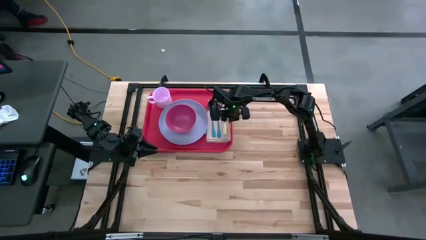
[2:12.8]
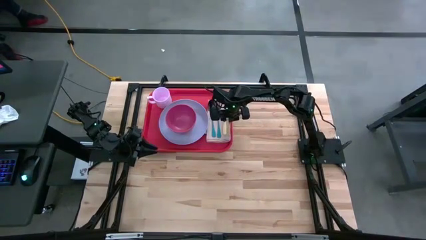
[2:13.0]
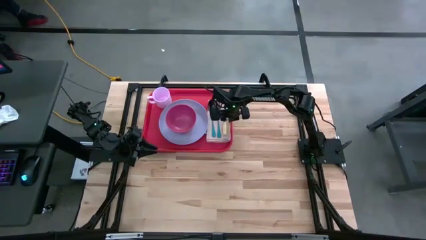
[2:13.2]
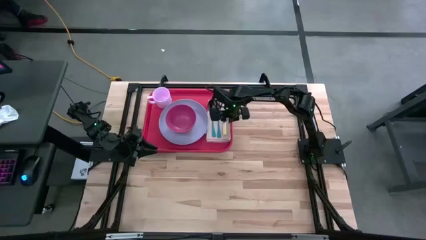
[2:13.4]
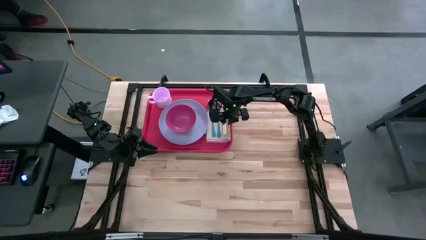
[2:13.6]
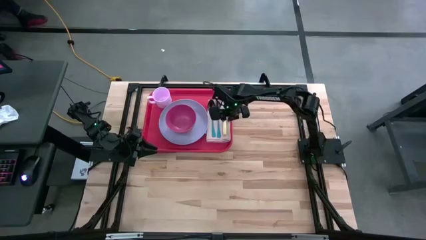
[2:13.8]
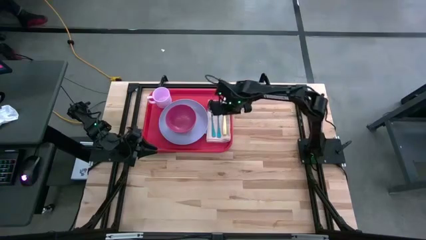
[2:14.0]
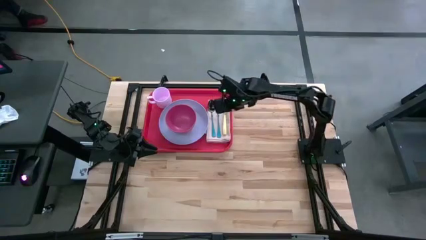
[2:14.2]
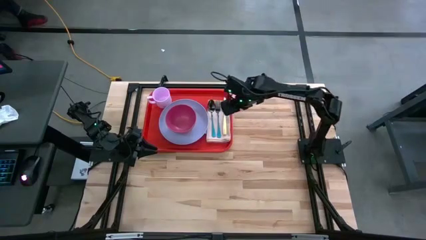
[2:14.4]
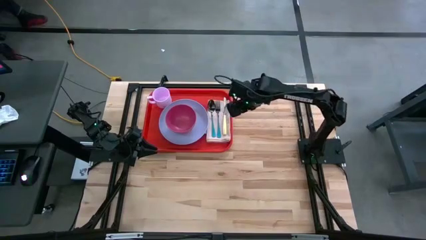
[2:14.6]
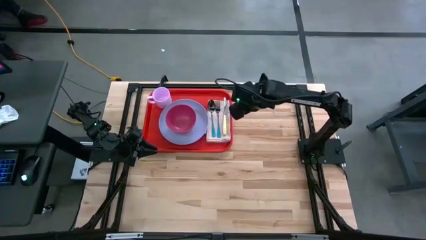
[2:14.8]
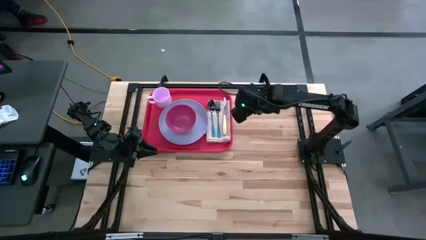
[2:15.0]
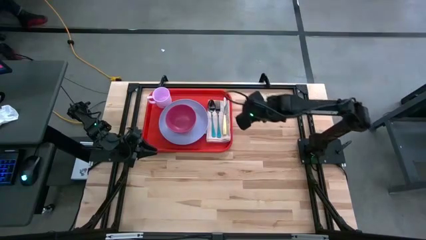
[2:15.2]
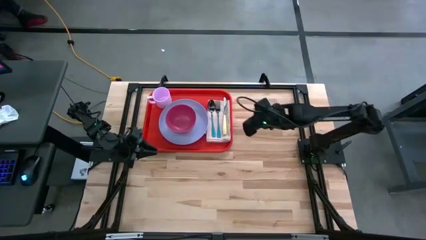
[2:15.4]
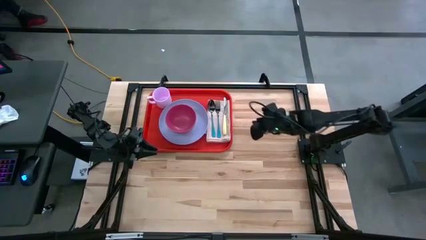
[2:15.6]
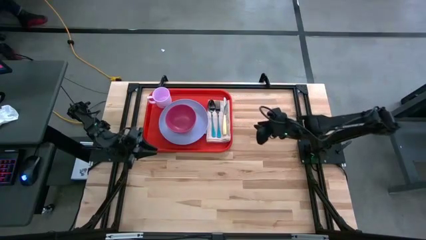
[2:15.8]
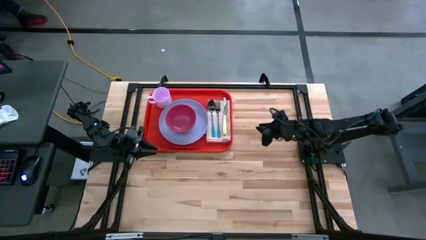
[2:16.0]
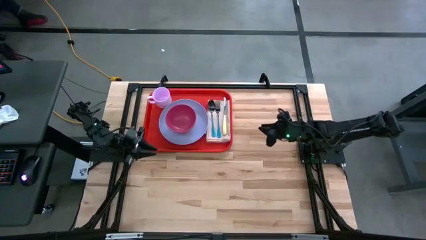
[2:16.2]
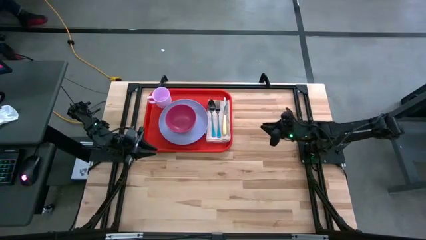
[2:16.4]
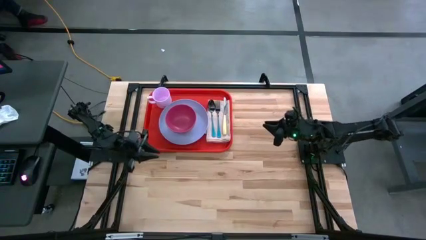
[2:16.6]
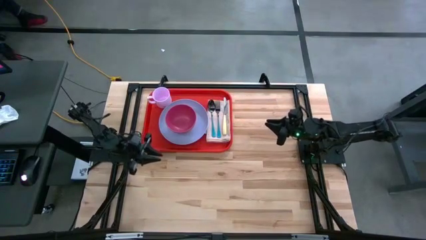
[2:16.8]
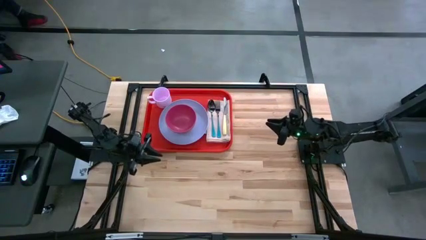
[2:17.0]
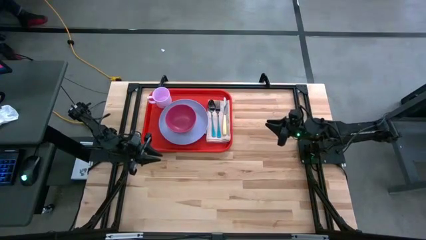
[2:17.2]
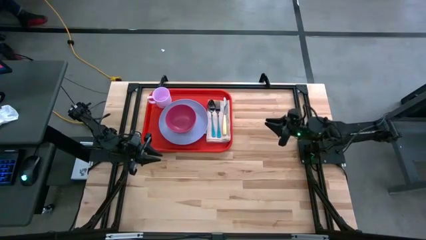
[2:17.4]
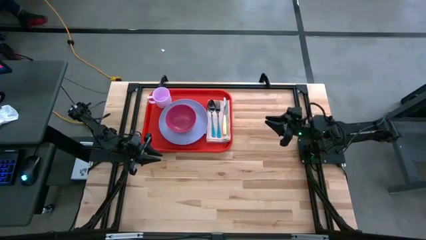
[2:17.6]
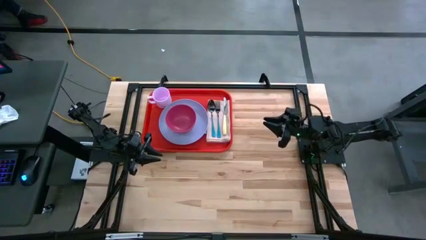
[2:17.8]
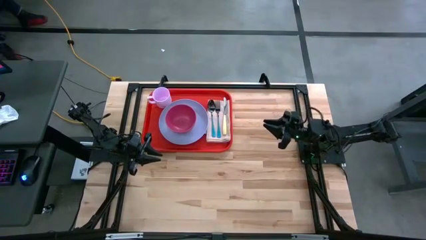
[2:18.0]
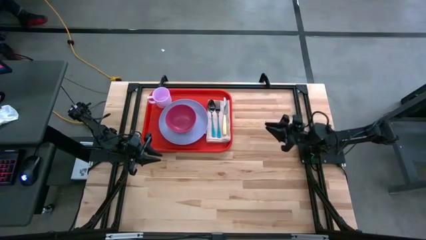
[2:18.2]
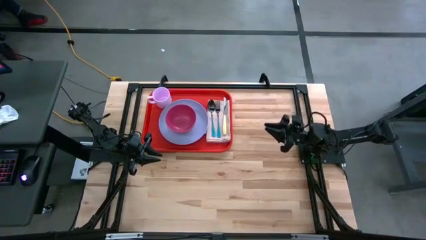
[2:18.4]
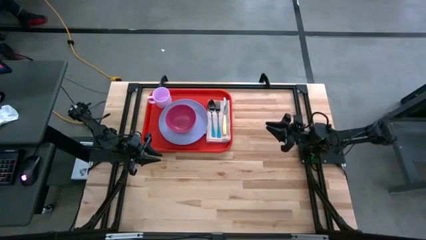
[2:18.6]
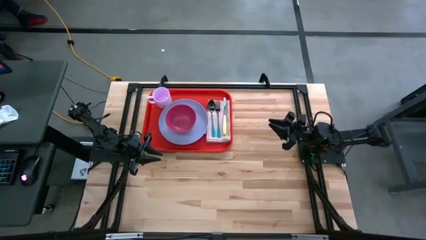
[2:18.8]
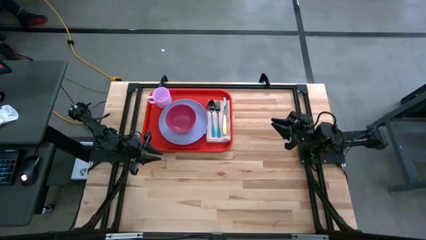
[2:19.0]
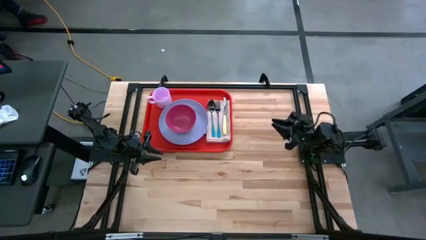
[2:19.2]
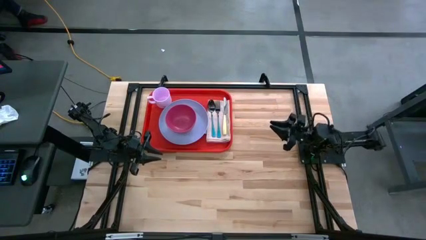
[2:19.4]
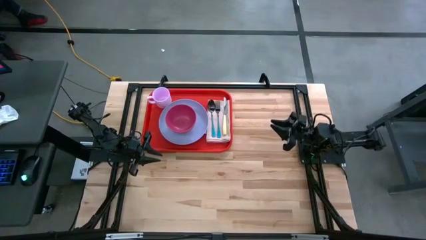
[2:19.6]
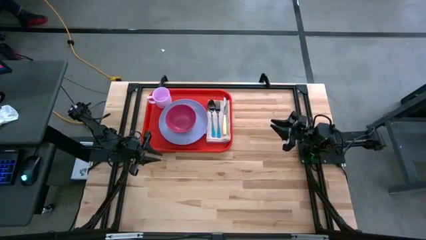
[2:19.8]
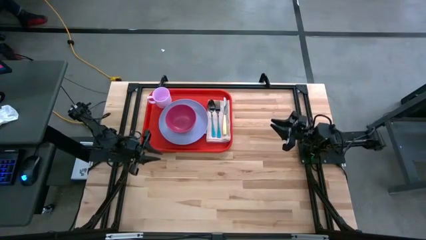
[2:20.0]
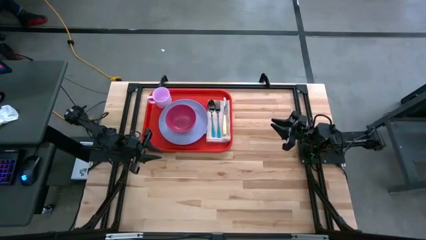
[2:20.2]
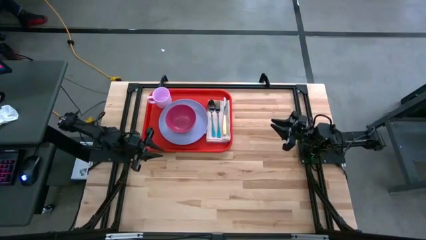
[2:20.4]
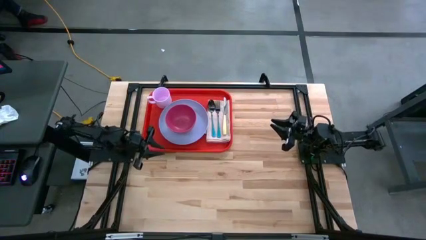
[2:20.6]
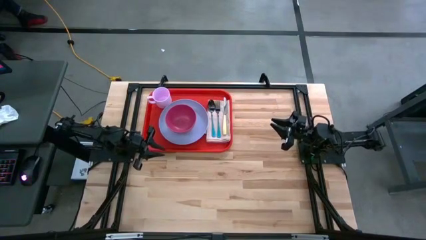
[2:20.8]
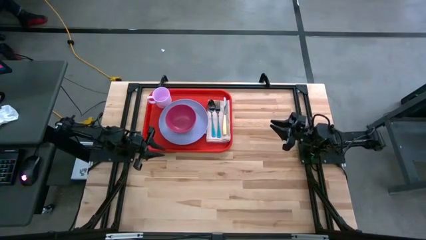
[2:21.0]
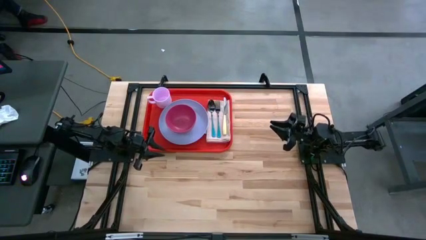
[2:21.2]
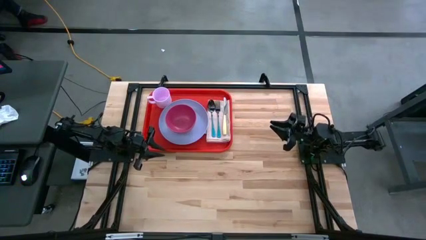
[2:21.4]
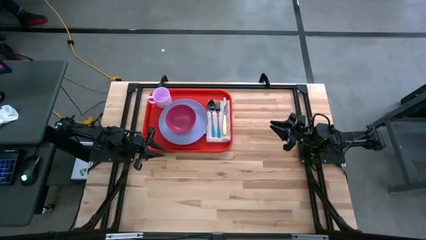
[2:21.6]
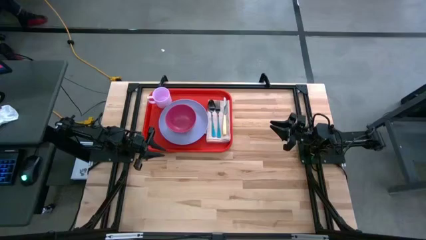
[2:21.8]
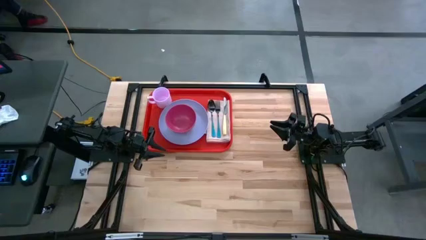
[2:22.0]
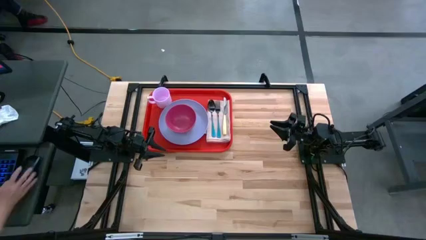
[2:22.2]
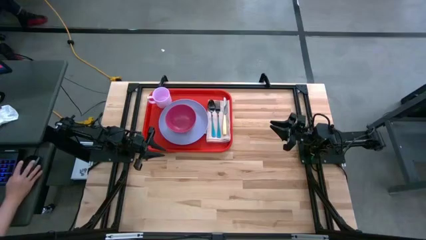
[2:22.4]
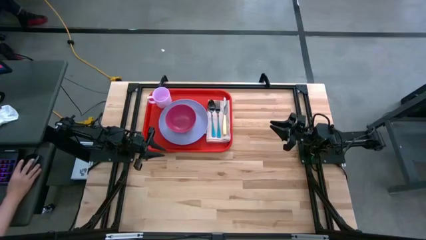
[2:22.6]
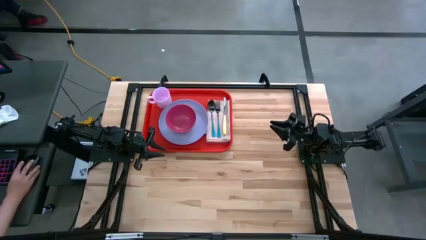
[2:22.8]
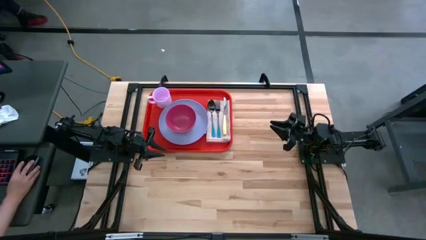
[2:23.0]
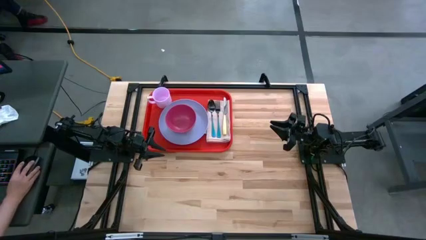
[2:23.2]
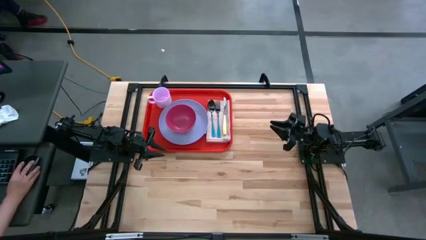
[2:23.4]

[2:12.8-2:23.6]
Task: Set up tray
Return to Home Position

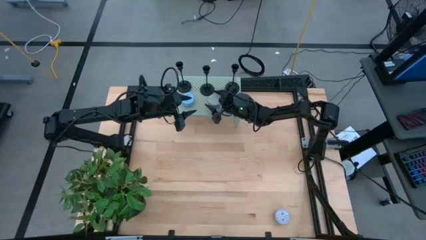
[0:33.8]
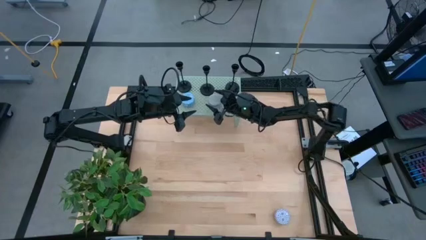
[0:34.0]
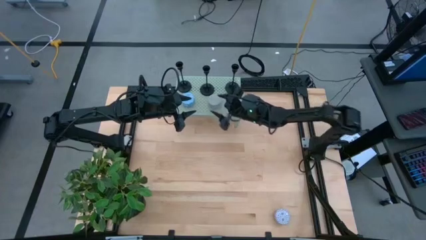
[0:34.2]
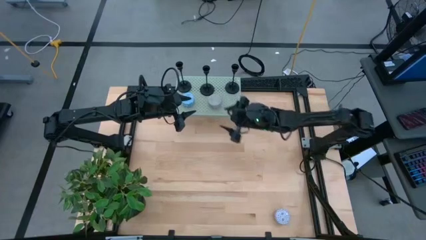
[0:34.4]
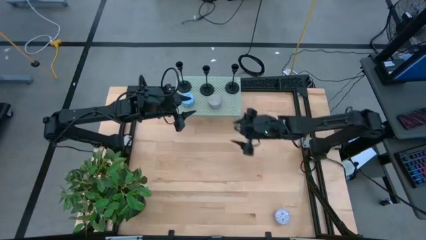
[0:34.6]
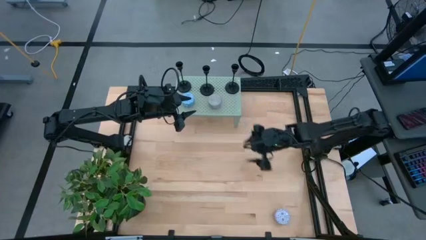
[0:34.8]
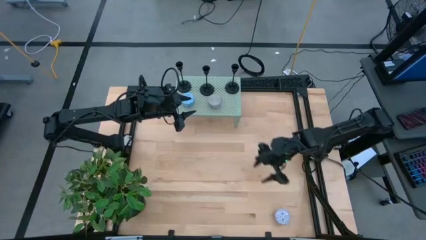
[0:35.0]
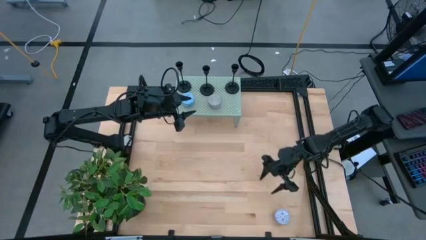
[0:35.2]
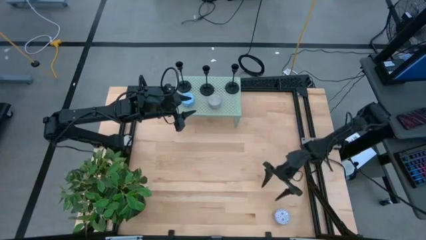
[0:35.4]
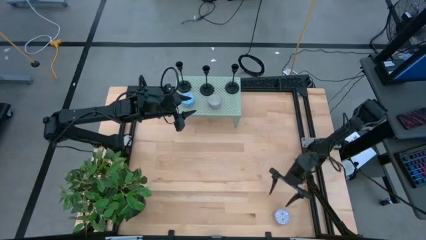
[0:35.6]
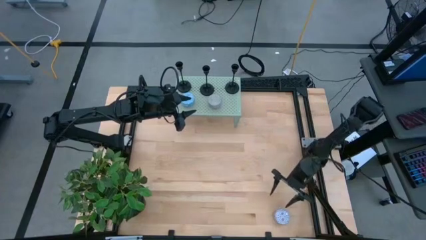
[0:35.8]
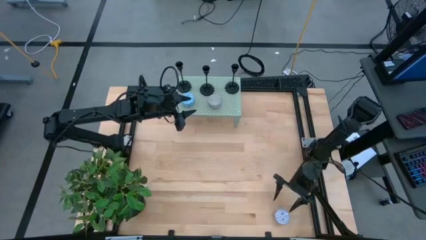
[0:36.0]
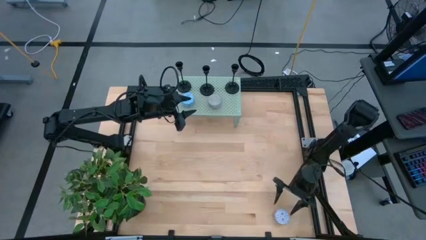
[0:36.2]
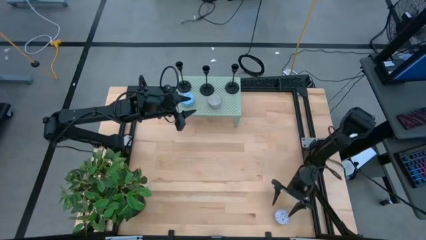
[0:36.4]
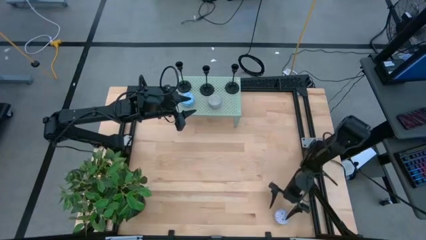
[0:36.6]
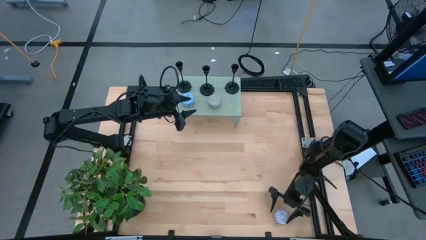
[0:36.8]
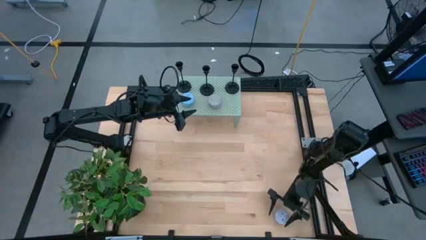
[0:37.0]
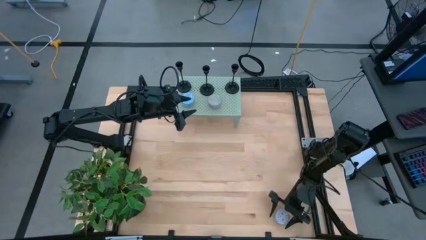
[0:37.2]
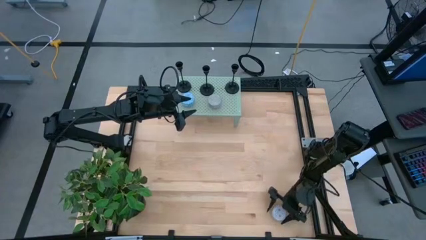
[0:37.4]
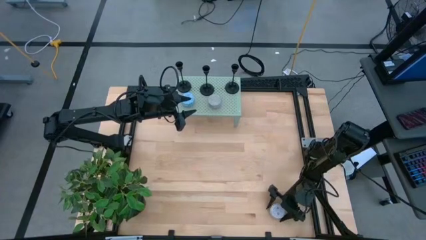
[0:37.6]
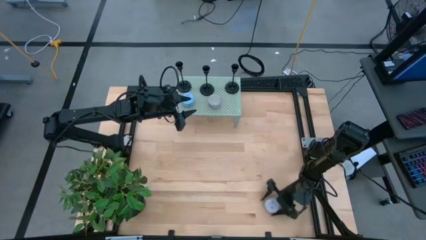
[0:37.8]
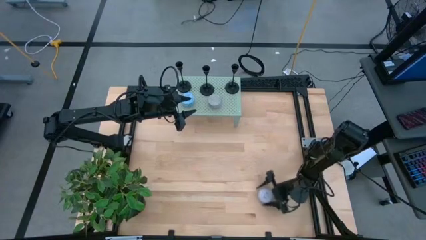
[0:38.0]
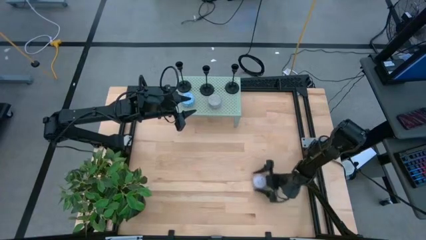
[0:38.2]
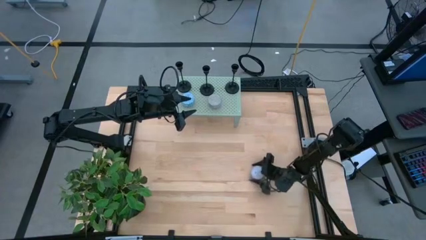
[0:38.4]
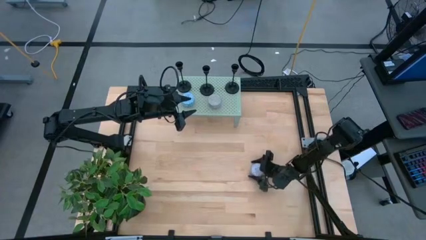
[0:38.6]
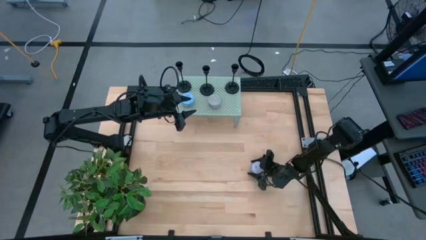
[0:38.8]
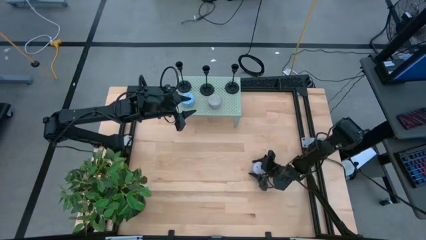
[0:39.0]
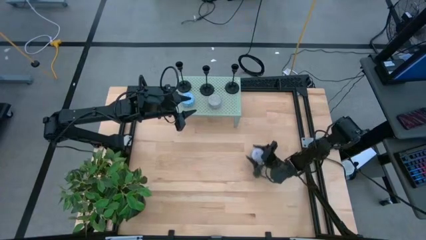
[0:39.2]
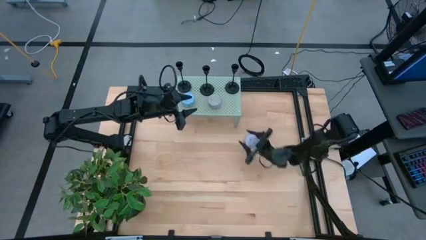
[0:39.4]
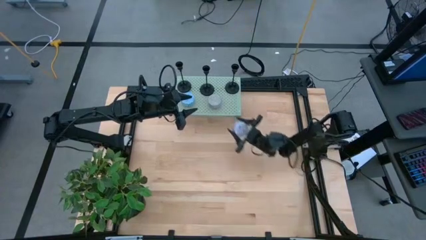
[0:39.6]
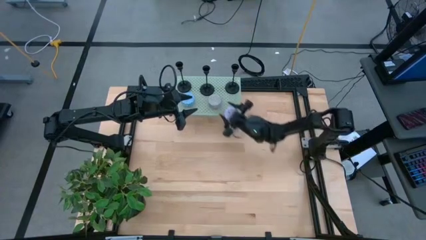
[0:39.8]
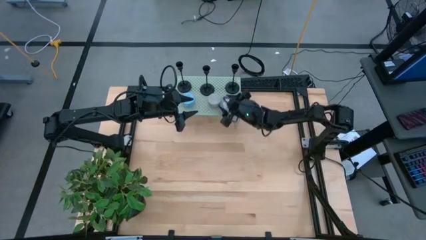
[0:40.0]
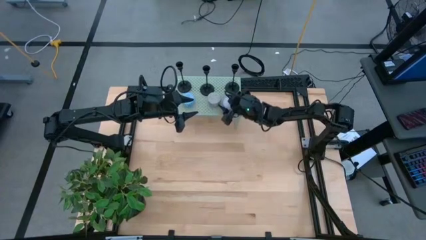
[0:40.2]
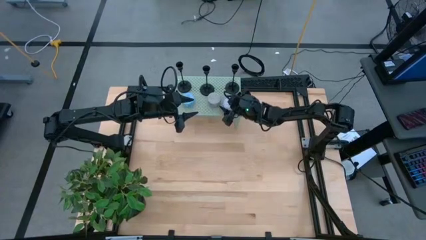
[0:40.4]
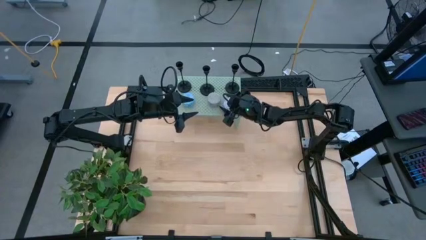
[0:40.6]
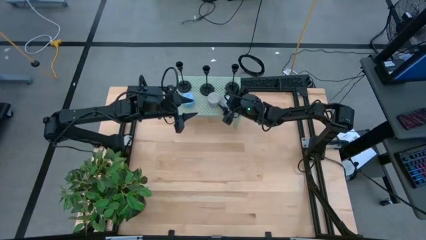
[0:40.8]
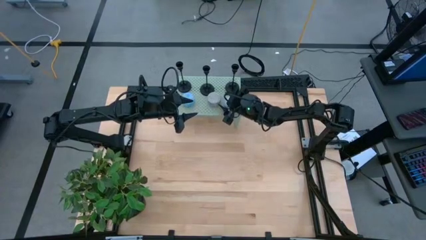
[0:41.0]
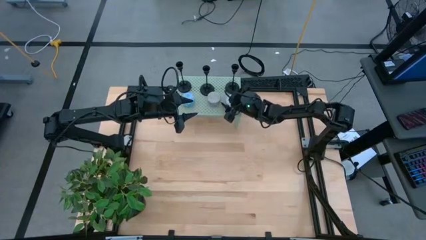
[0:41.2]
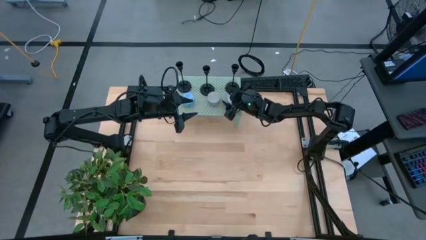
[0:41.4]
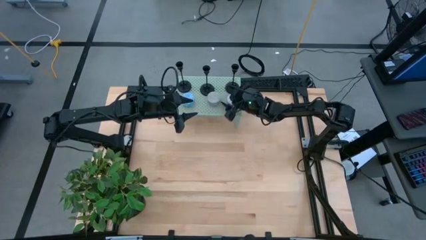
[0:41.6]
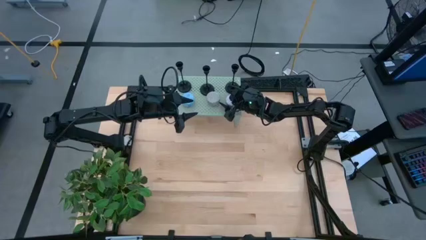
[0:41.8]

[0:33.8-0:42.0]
Task: Pick & Place candle stick holders
Put the purple and white candle jar on the shelf
